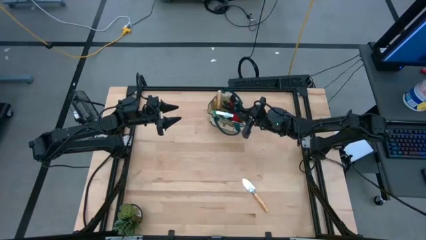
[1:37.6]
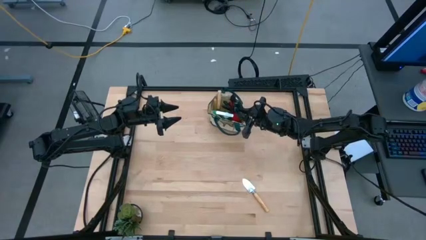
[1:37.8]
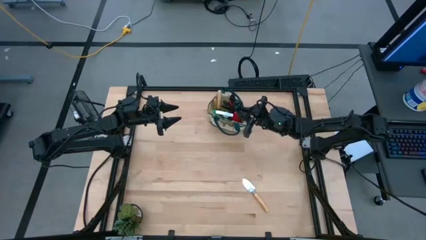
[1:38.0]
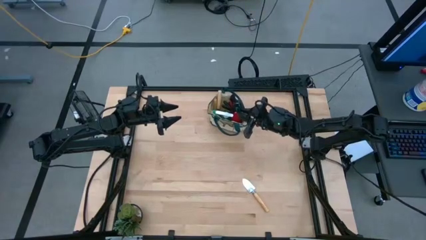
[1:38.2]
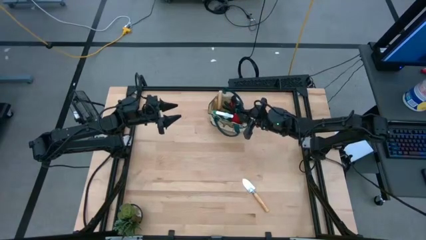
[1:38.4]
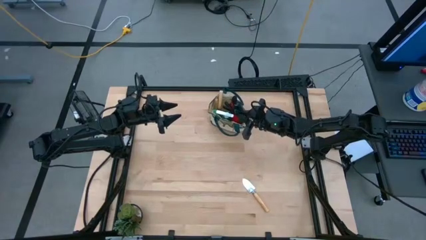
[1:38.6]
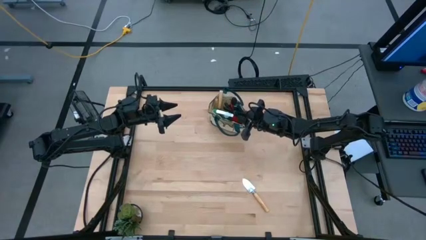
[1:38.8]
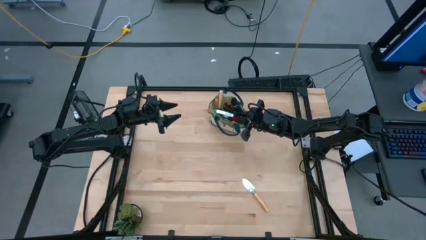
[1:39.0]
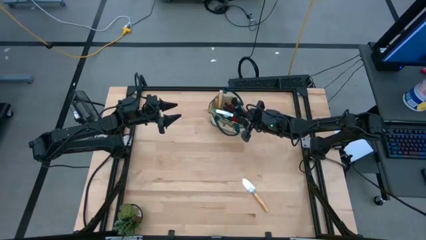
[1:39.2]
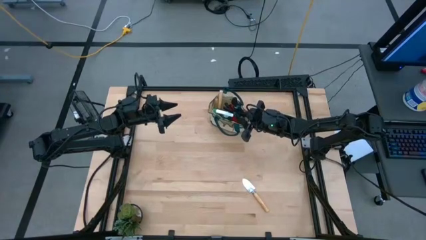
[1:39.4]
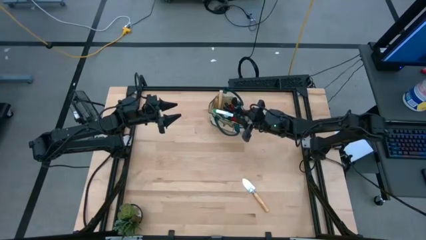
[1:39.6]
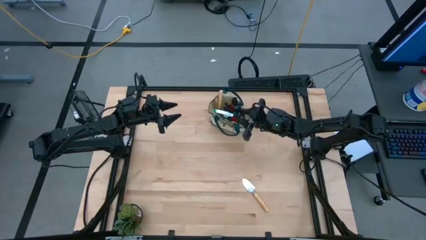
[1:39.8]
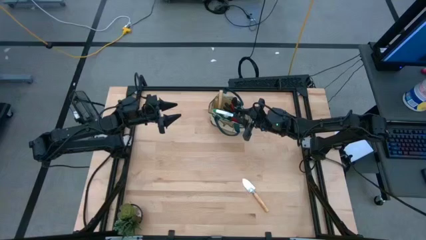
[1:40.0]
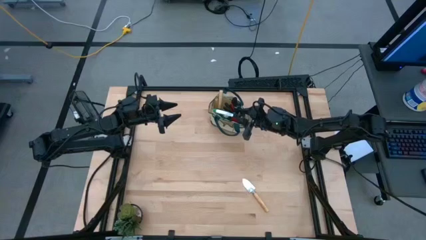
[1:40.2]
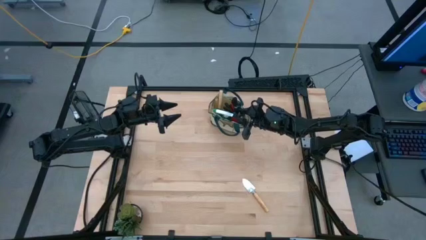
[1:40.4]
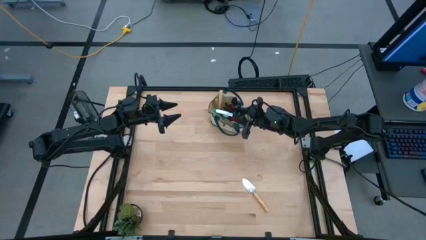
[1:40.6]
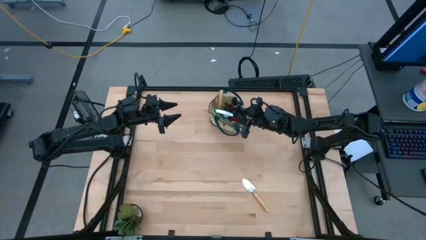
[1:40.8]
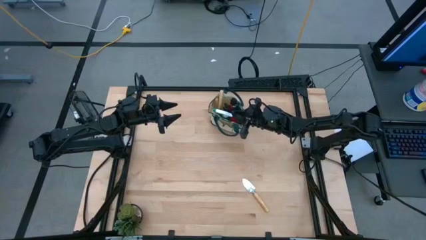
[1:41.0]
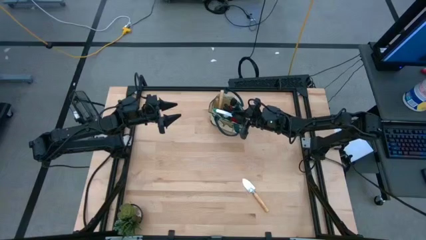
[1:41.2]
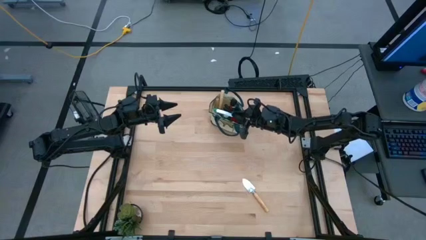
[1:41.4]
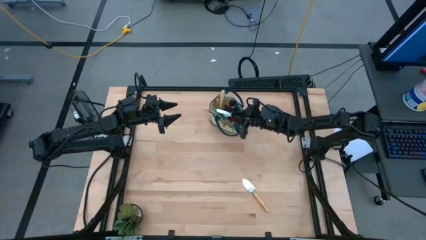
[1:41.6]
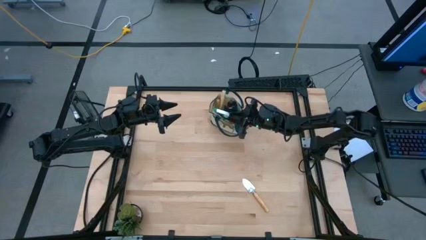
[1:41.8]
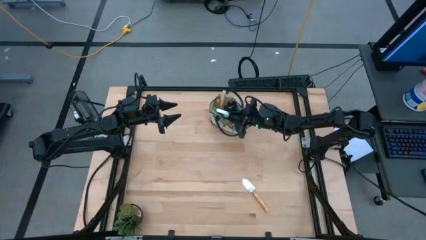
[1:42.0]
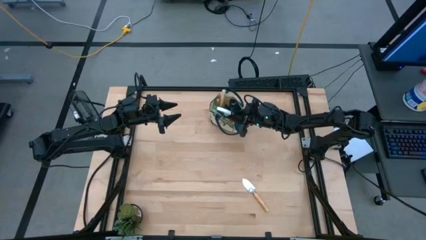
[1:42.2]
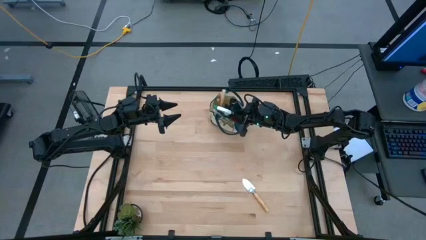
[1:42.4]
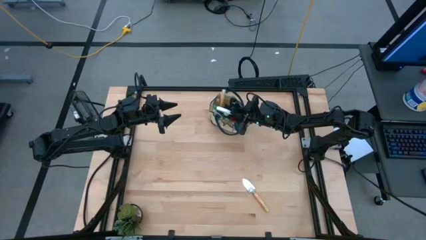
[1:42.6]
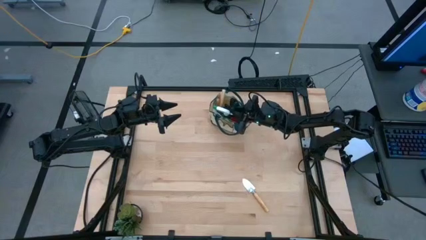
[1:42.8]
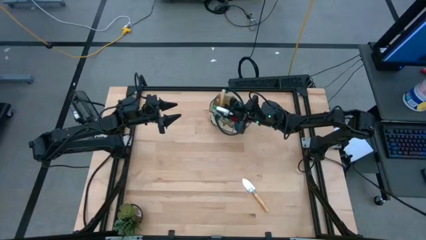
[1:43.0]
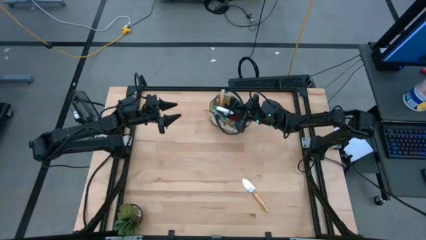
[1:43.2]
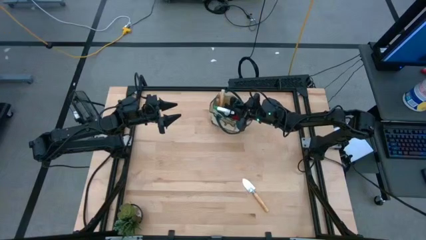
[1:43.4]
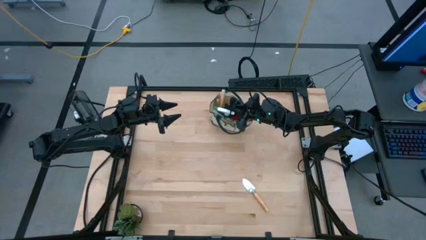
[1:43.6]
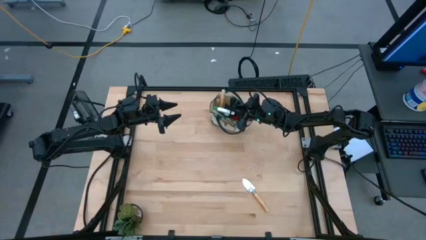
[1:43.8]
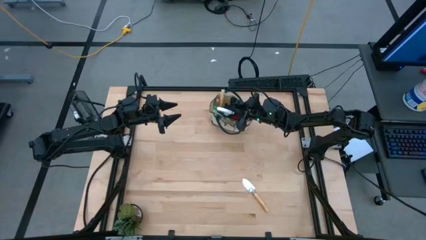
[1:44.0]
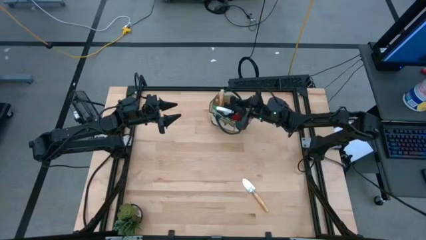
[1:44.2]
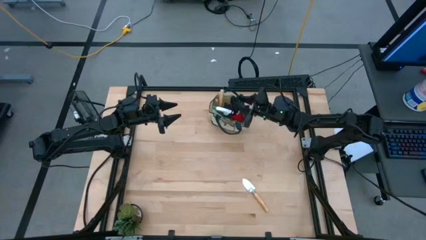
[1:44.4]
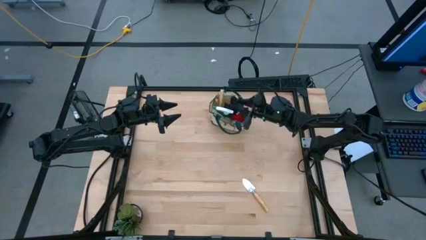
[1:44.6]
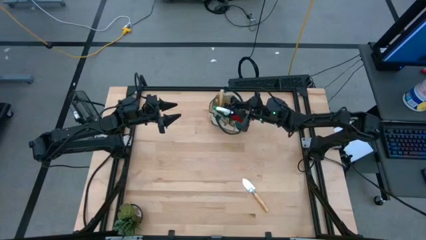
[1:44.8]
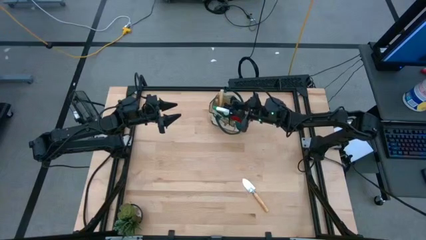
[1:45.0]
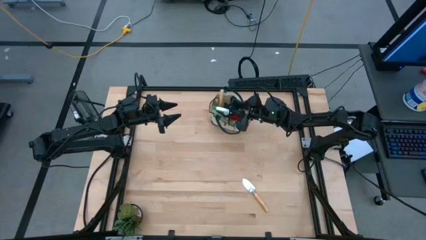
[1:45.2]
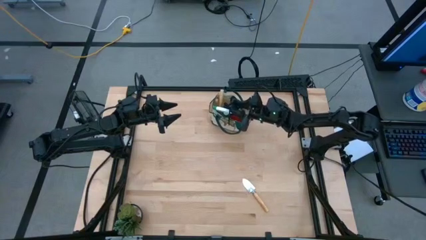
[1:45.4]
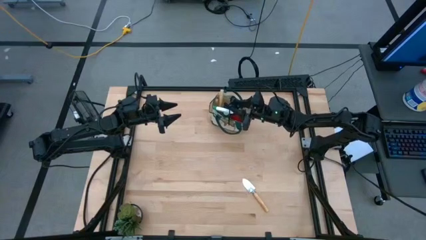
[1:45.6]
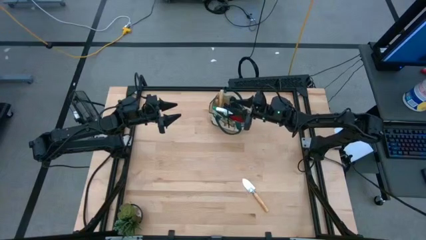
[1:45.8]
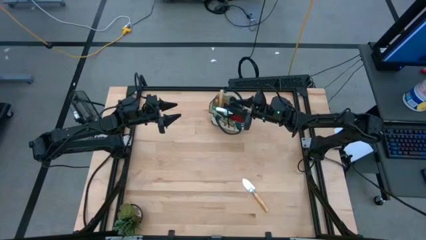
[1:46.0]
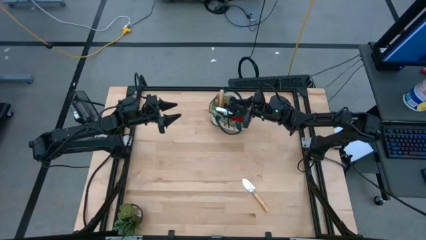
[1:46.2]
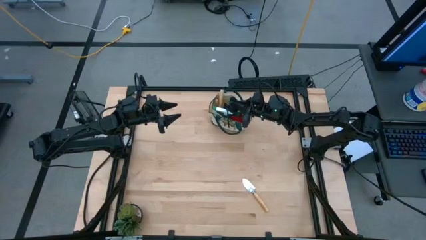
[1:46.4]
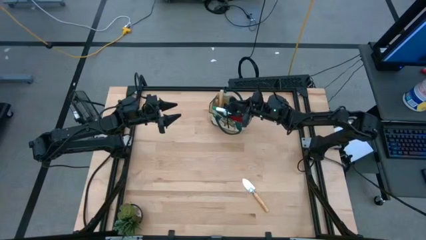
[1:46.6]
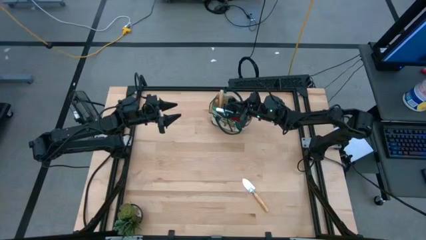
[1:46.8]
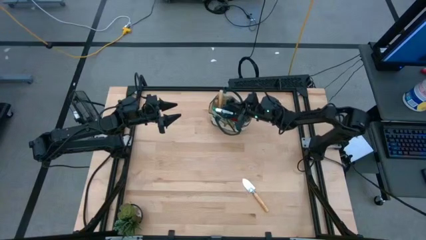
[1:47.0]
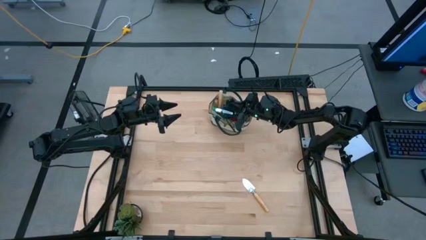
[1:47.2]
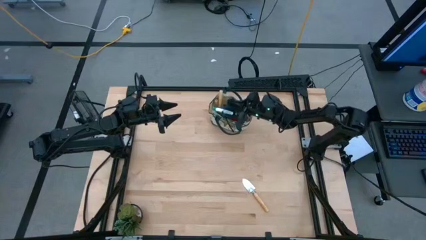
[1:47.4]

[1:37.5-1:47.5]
Task: Pick & Place Garden tools in Gardening bag
Put the black shear scissors into the green gardening bag

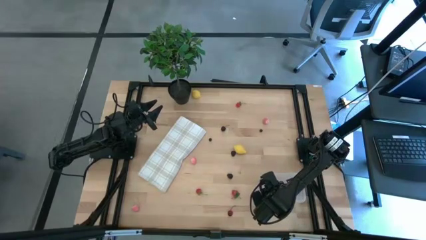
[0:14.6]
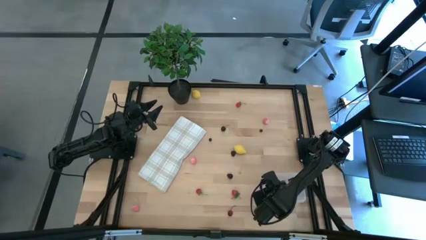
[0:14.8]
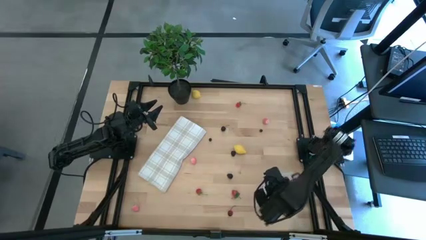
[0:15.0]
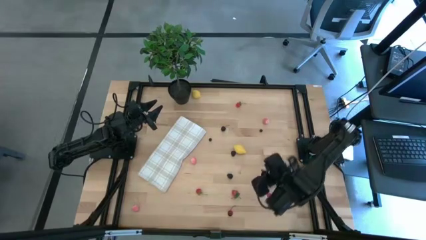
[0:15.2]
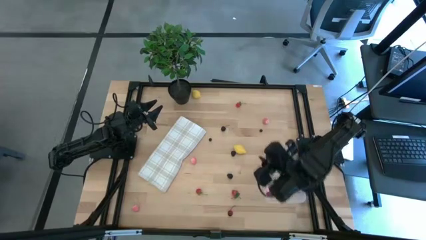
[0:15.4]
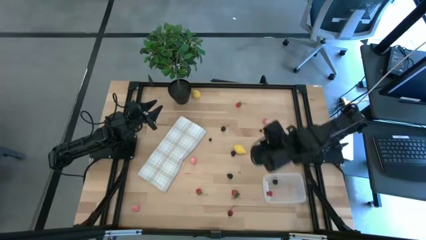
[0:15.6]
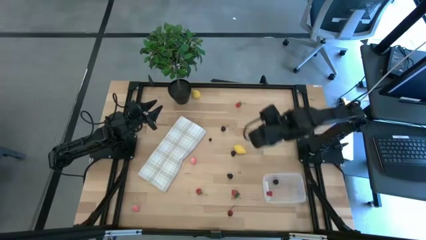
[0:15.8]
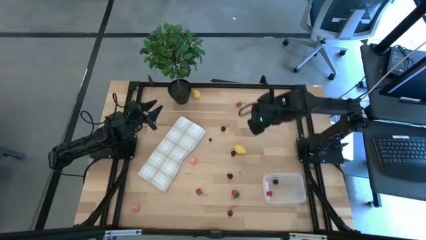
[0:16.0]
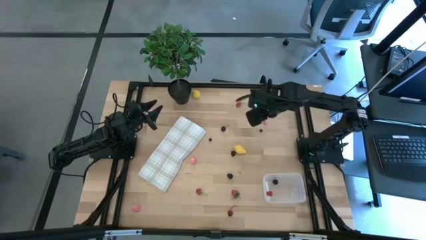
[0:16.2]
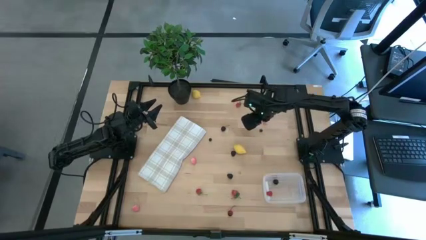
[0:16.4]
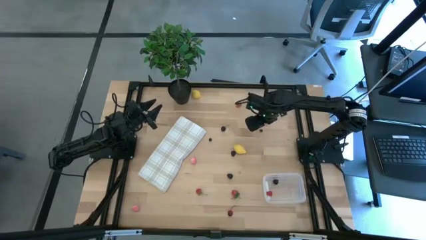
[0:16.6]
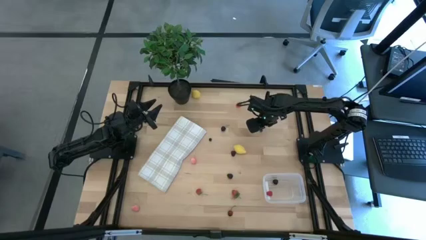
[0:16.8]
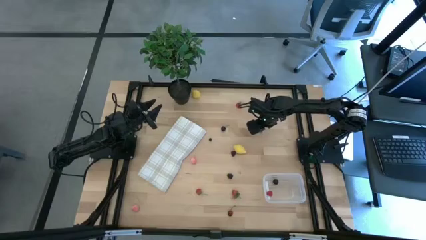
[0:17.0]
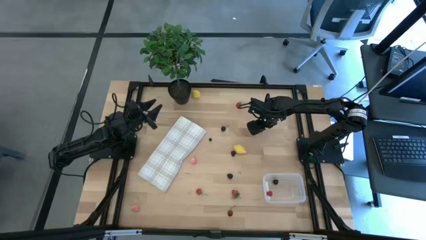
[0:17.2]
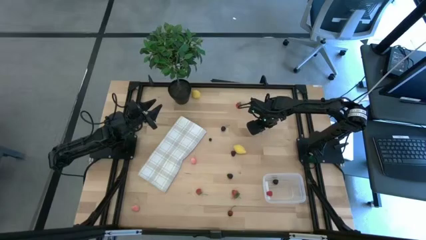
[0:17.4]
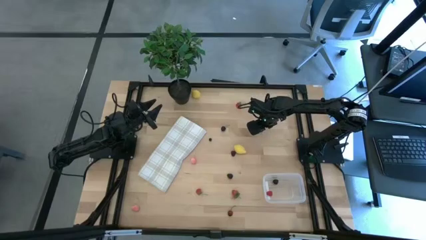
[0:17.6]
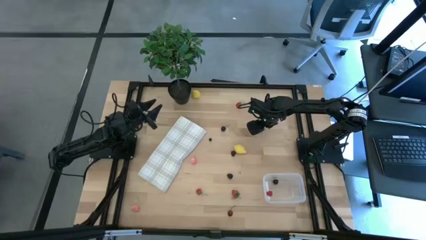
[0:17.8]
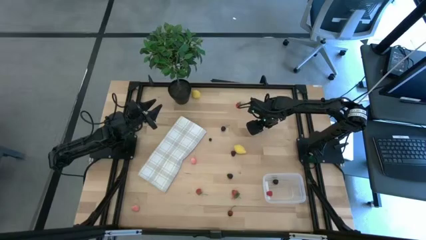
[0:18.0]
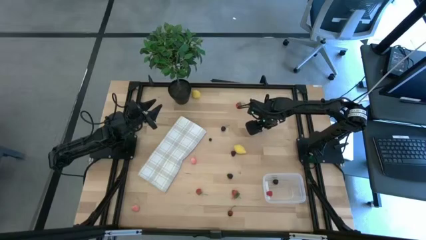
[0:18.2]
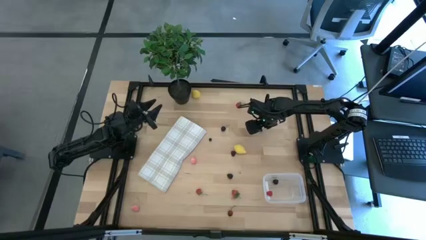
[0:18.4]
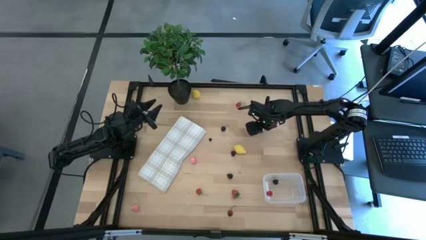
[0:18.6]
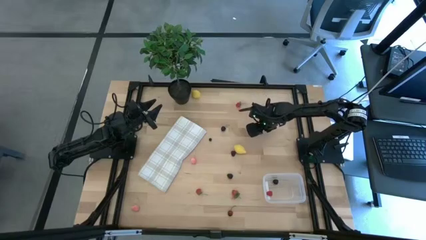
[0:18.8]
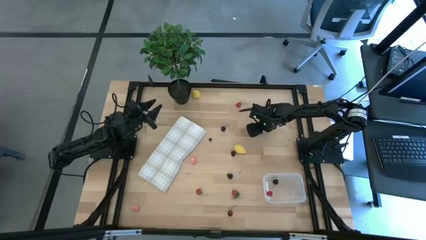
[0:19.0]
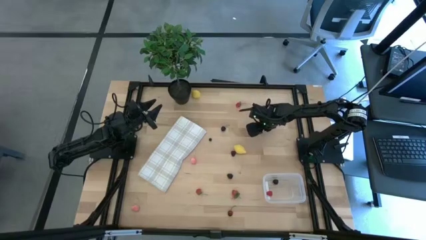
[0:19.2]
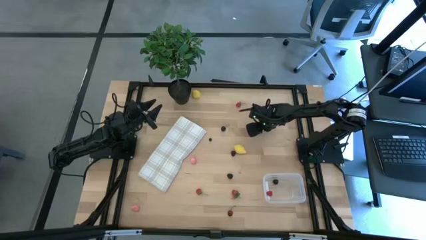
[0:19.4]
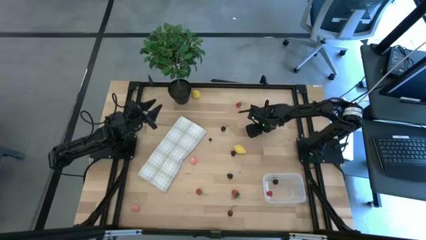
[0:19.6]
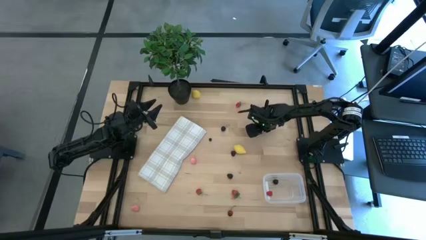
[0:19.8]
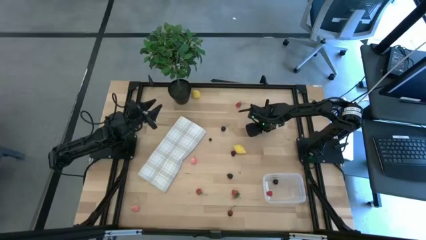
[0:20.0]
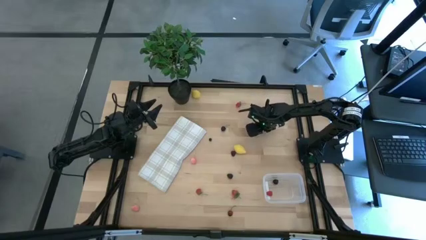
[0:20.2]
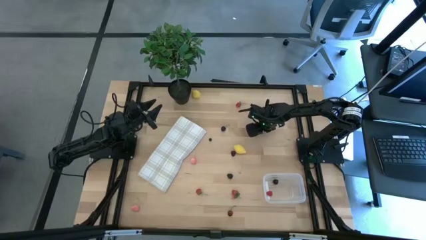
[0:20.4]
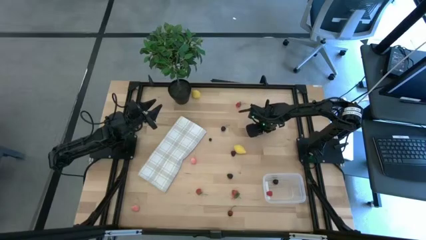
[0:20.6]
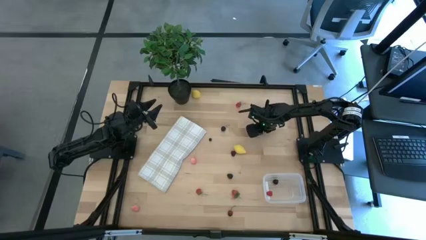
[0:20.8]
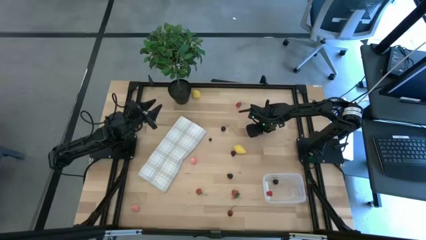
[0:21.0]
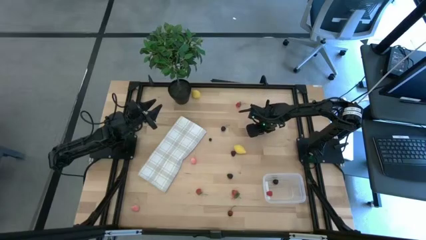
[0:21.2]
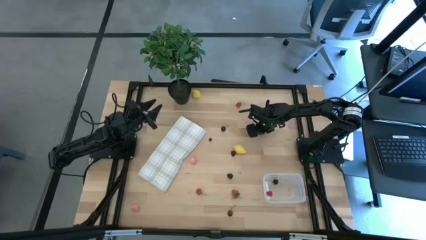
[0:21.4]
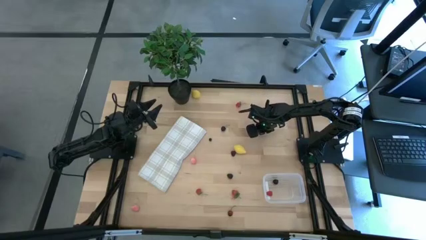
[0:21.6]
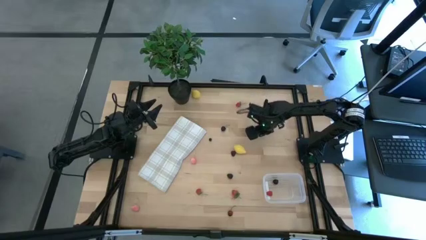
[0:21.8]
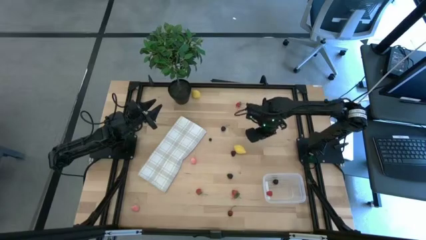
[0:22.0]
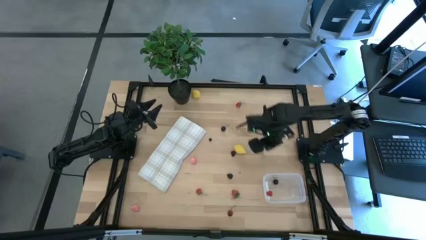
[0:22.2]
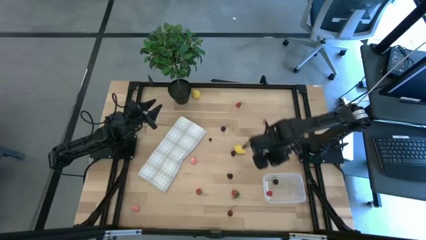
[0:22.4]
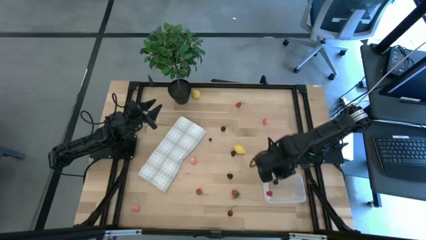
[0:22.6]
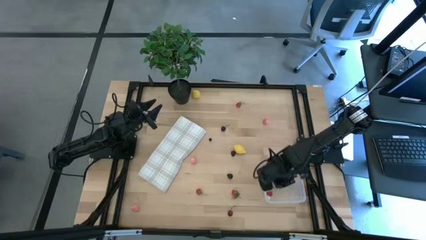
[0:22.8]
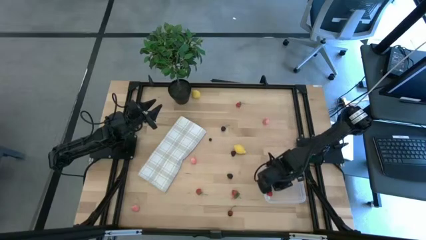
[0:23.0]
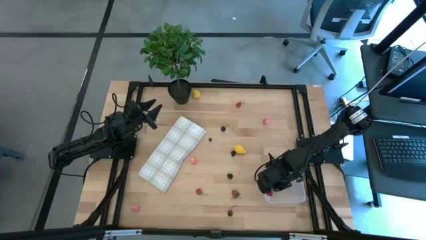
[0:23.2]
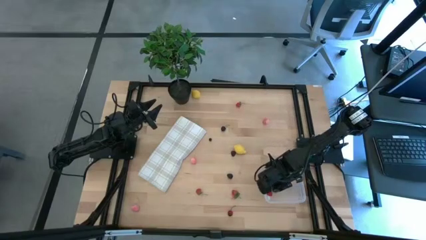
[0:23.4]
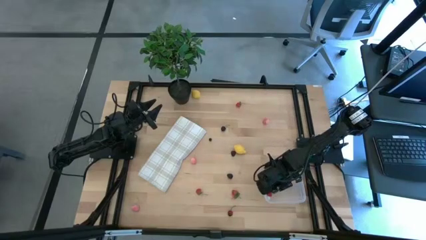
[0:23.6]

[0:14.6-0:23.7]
Task: Pick and placing Produce into tupperware
Put the black berry into the transparent bin
